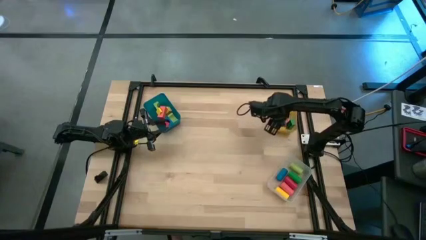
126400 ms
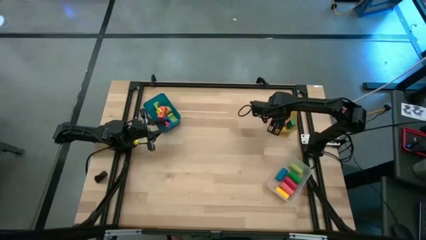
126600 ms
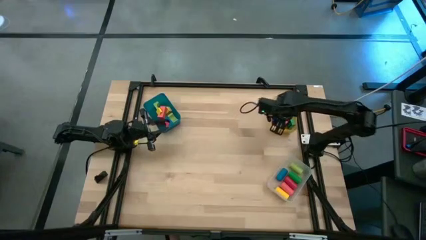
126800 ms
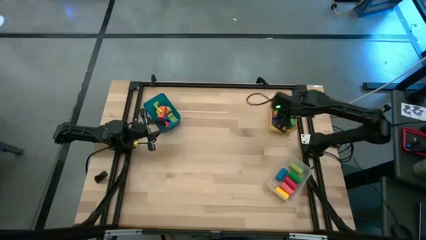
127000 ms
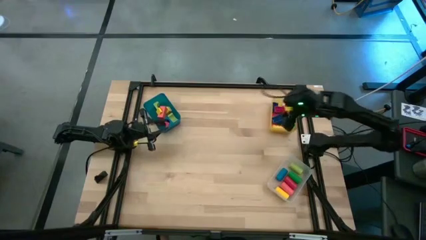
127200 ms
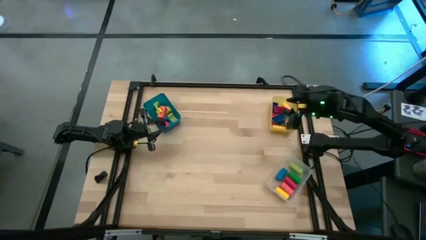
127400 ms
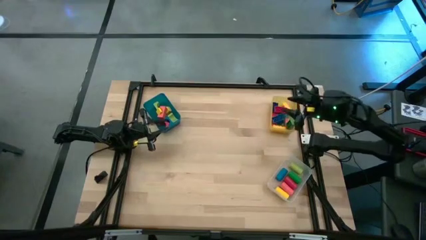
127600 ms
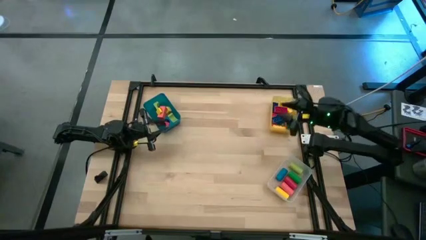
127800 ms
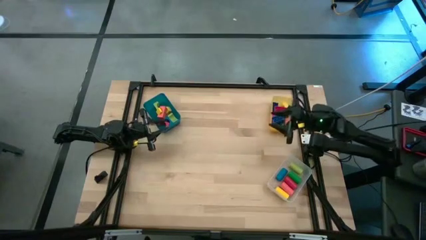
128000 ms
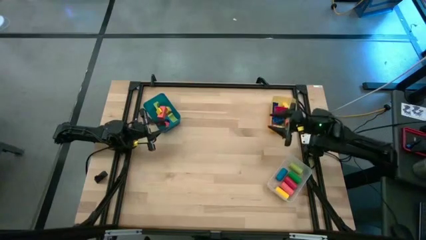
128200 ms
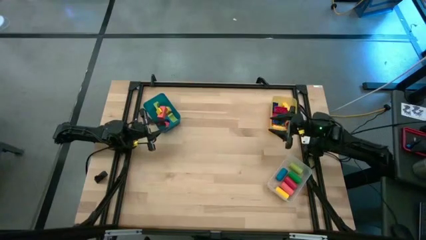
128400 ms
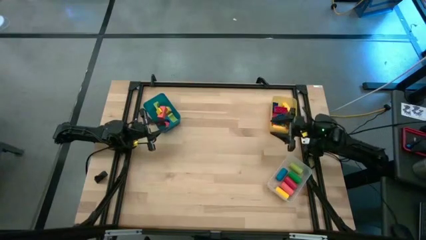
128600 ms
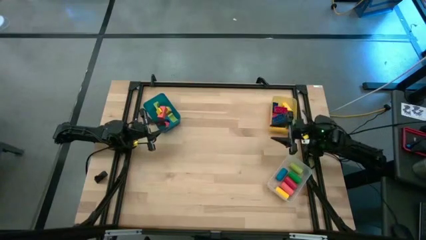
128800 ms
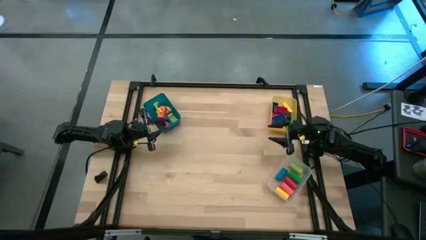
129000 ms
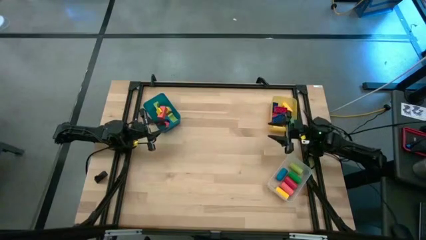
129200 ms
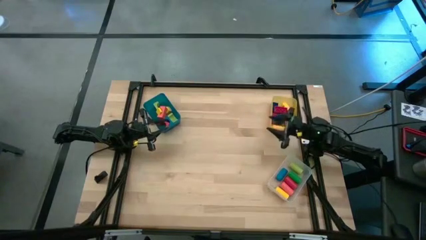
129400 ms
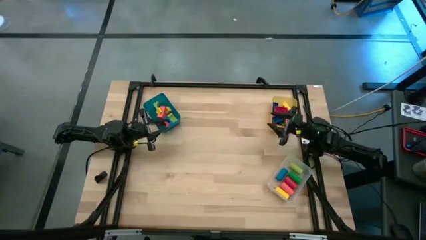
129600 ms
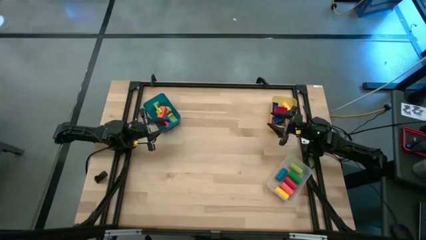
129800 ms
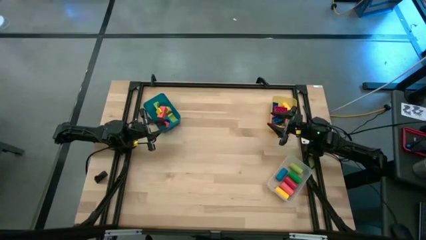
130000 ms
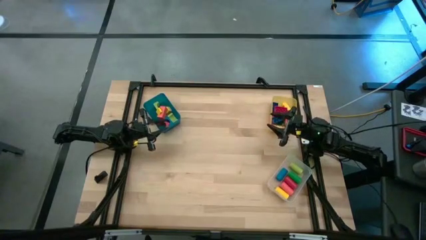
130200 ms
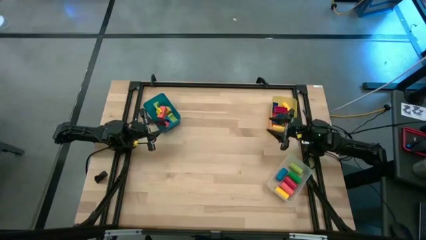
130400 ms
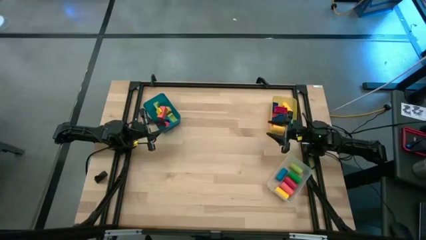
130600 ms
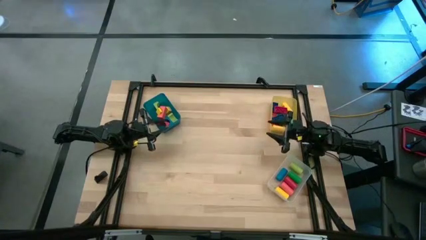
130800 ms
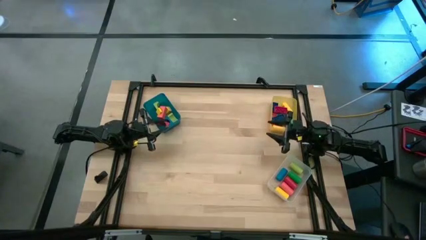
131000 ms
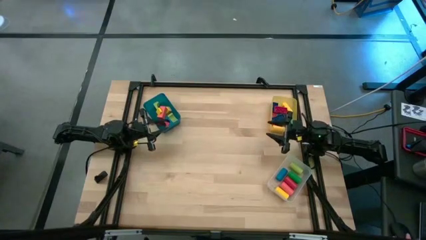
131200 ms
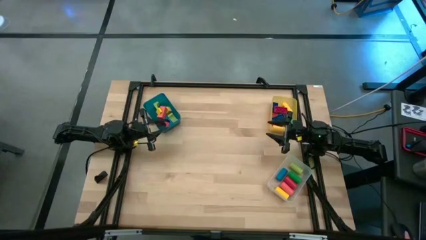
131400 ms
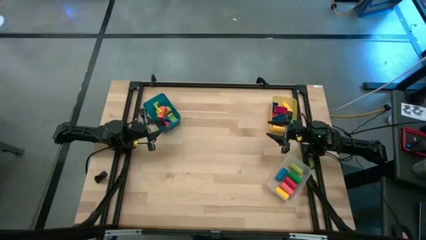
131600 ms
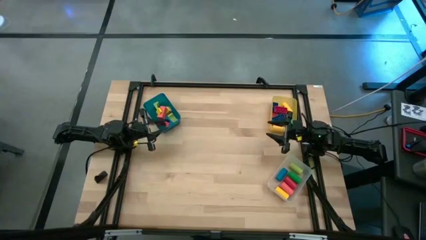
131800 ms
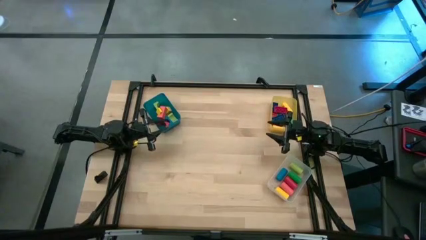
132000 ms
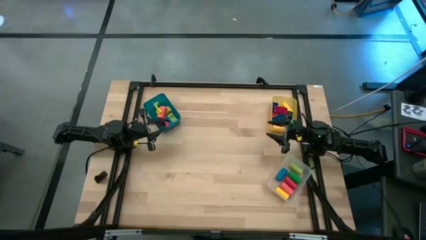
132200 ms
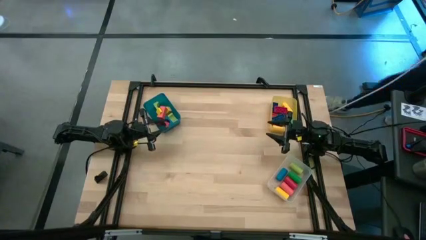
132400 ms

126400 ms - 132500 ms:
Task: Sort blocks by size
Return to Home Position

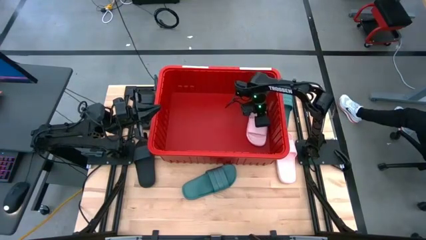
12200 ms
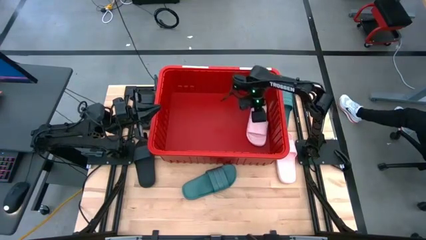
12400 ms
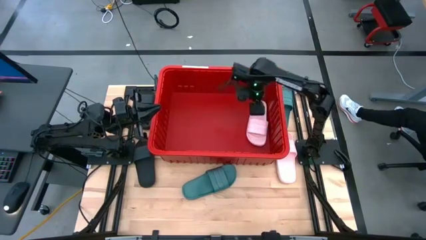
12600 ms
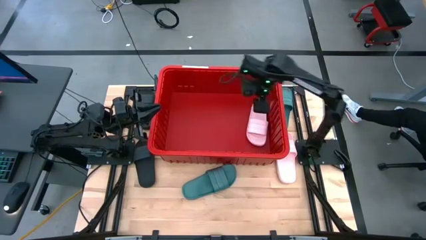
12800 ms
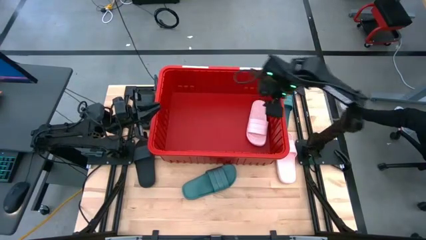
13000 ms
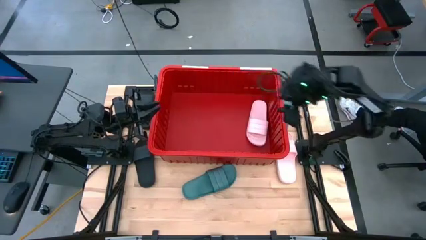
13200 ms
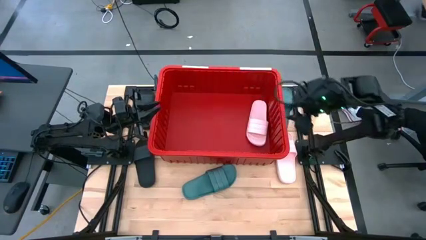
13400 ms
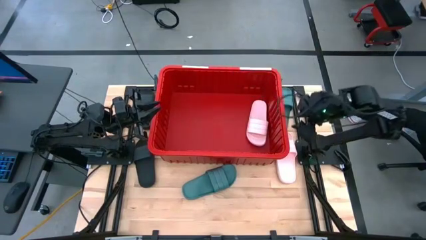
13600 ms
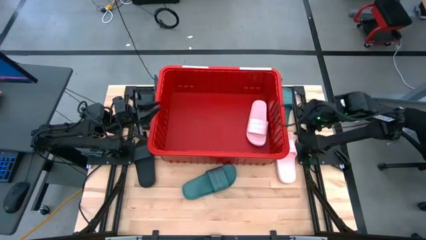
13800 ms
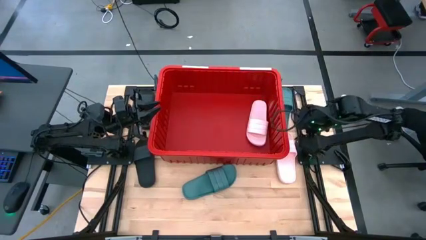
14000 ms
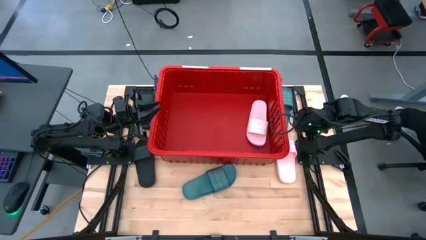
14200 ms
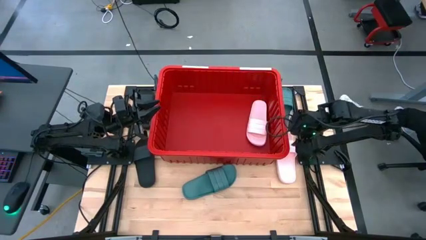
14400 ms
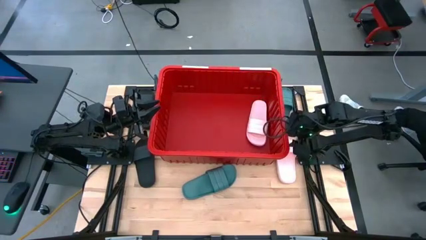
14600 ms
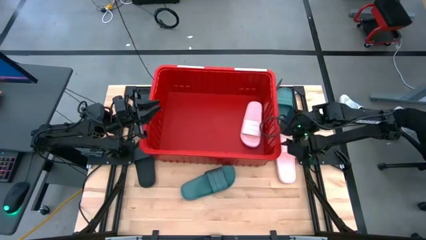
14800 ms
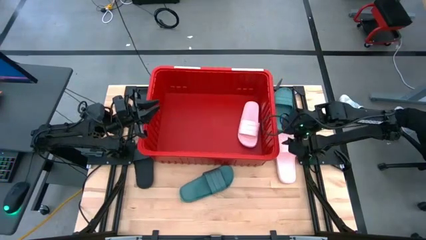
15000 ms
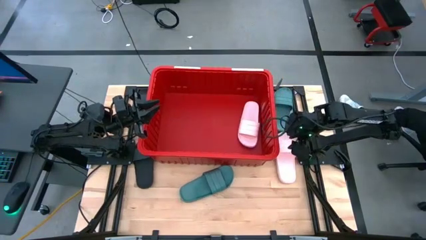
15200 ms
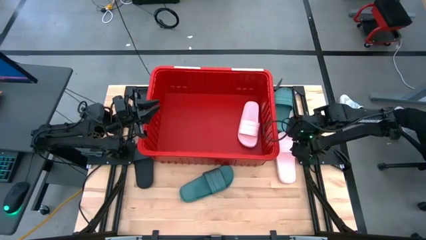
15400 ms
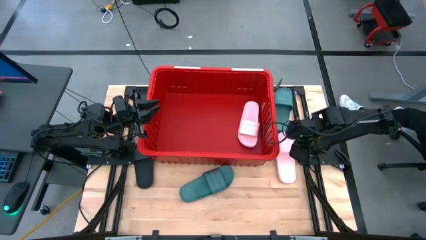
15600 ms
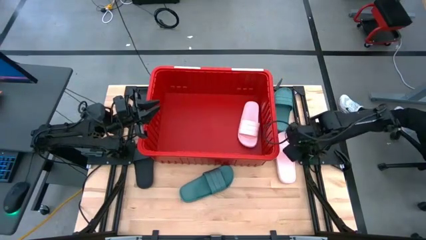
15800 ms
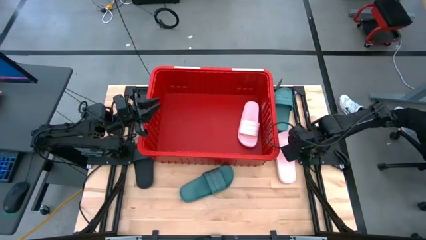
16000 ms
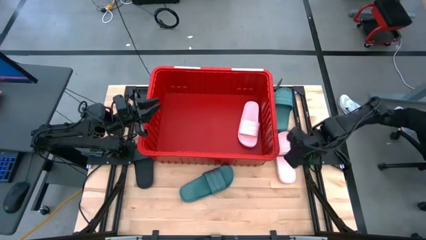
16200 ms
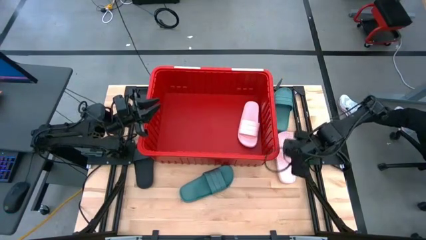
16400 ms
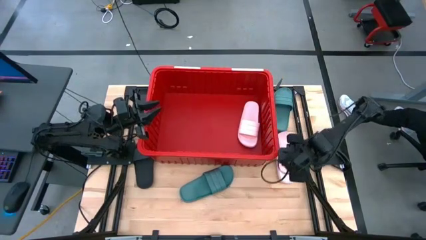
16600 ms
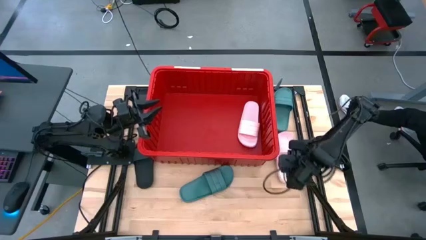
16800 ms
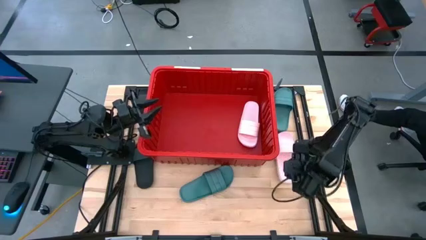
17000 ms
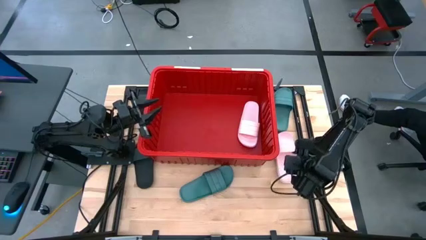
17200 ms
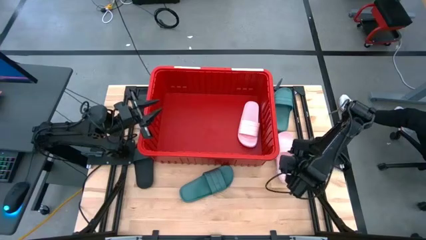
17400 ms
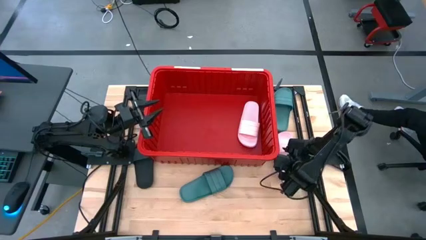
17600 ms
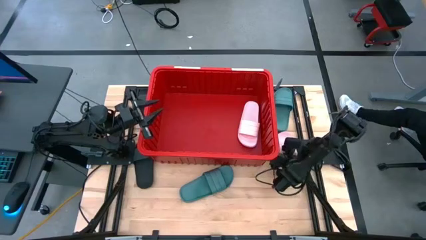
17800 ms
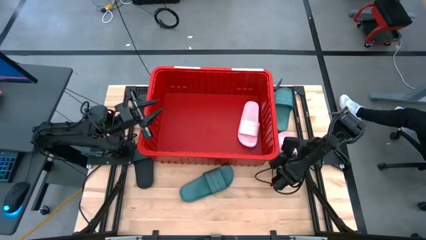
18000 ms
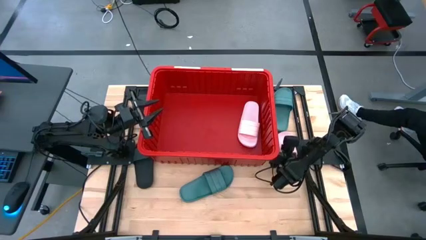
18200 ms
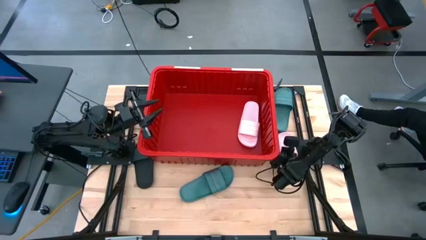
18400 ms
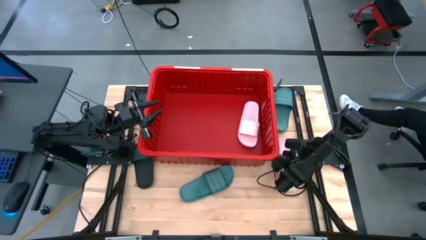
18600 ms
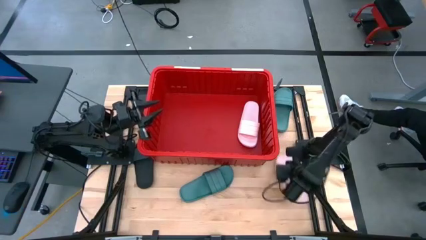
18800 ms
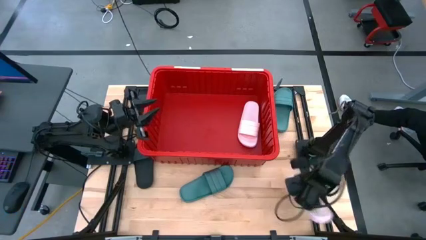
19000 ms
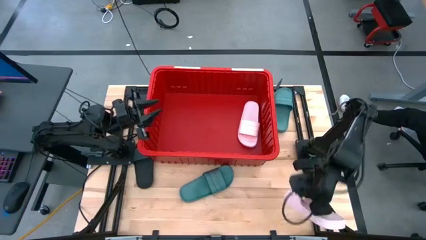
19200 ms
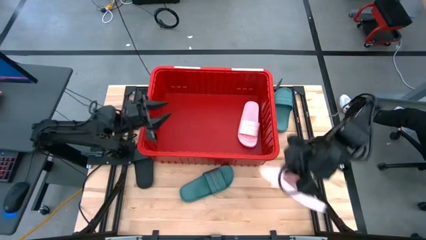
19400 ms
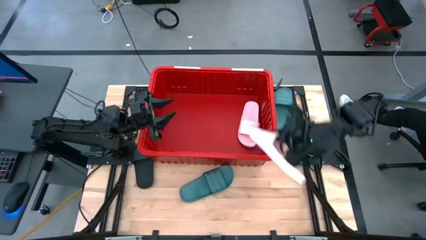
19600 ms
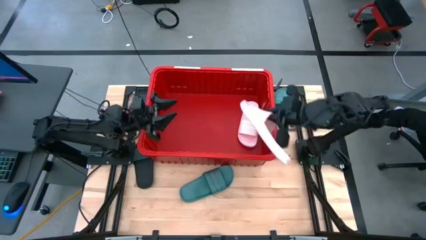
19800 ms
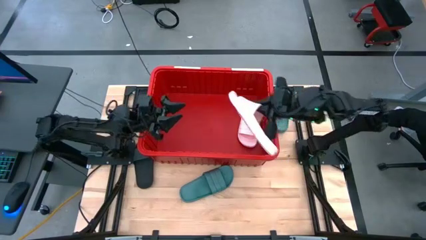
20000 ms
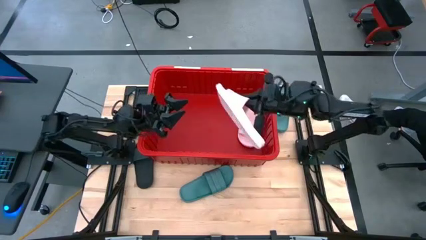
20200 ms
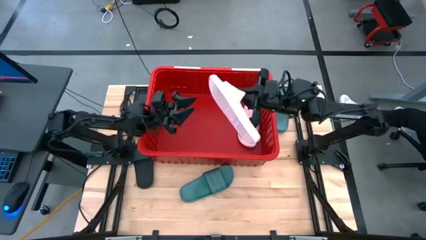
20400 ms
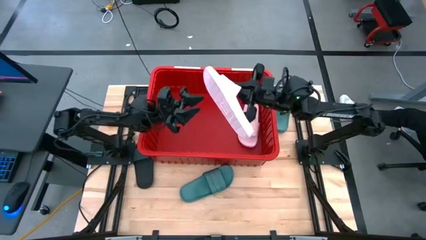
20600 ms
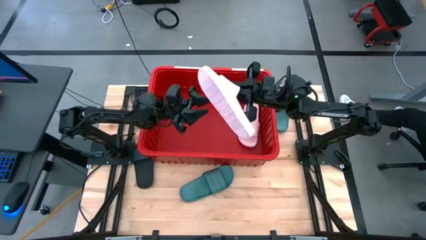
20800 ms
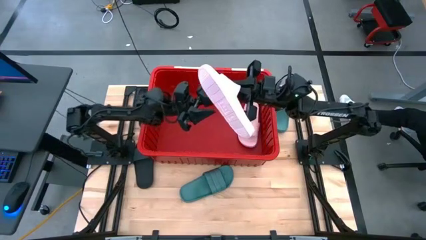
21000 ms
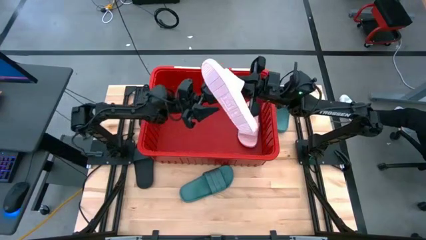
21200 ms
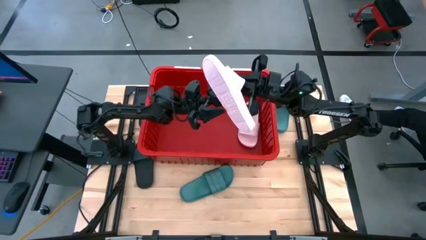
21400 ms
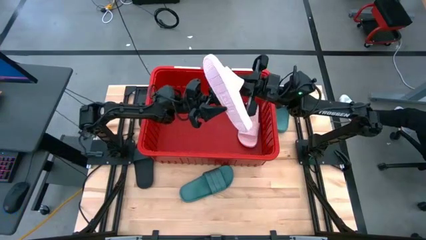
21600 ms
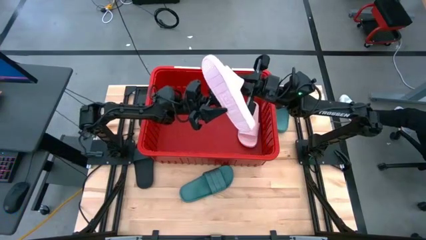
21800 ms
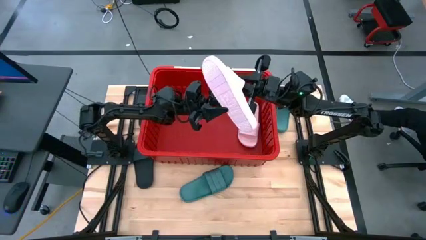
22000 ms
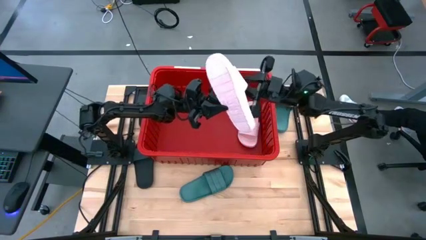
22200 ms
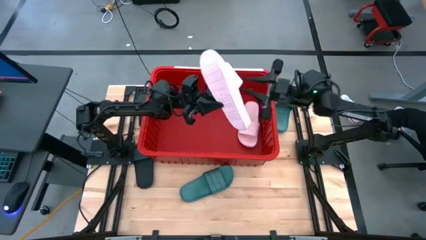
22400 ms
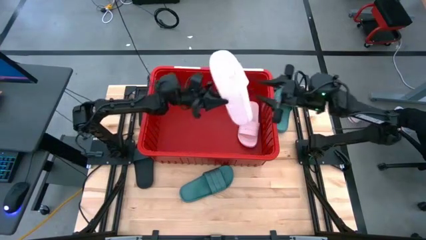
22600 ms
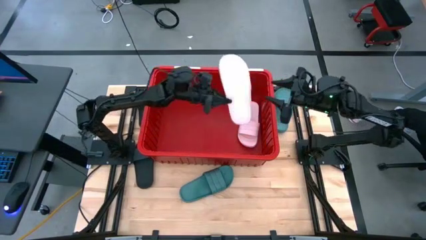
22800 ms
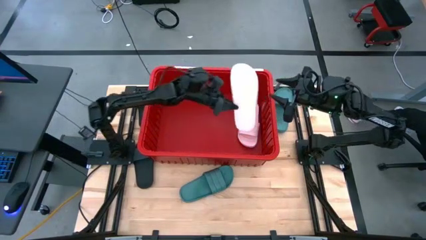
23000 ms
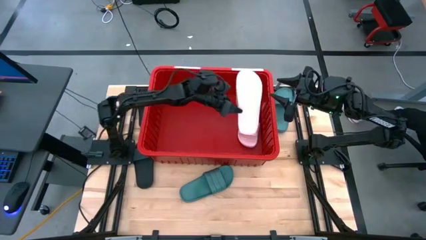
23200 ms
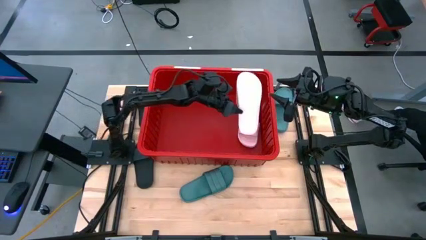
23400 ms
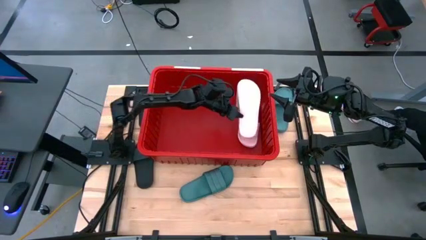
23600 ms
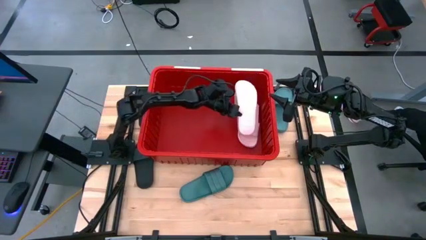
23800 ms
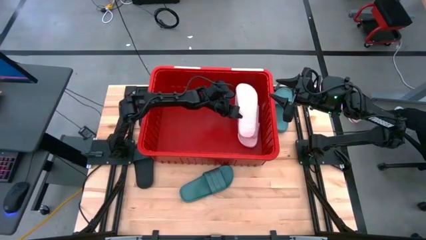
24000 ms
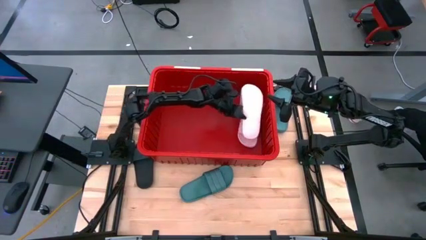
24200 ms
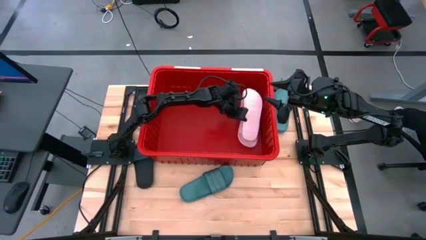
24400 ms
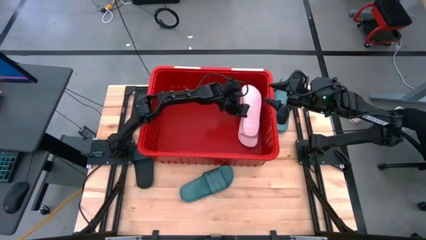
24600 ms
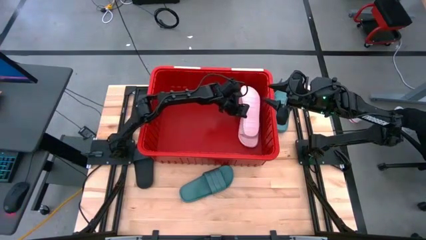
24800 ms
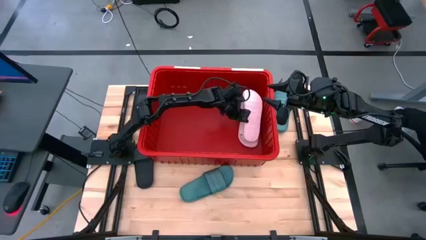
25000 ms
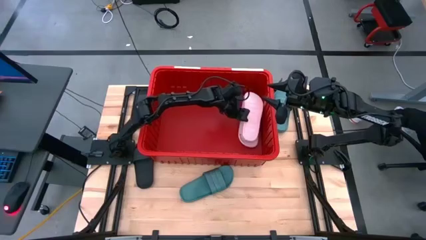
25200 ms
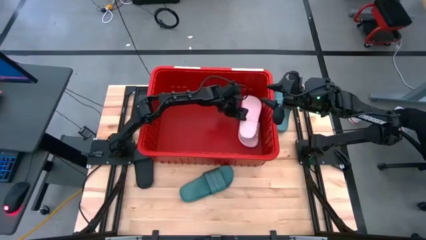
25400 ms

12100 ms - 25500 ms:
Task: Pick and place slides into bin
Put the pink slide in the red bin
